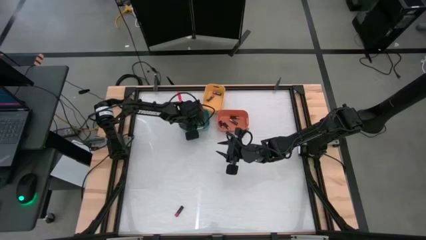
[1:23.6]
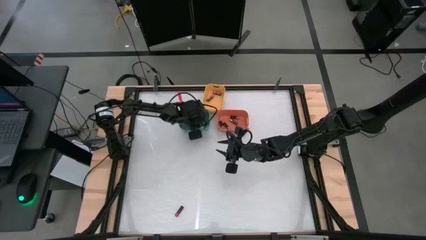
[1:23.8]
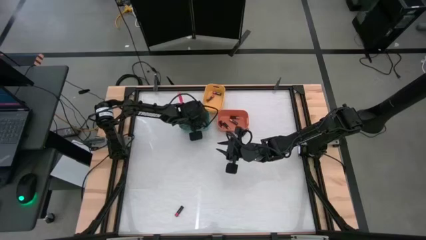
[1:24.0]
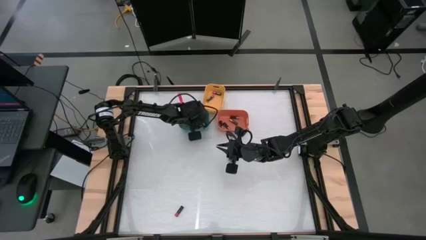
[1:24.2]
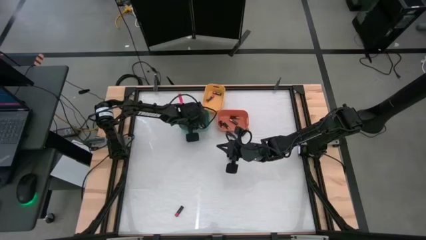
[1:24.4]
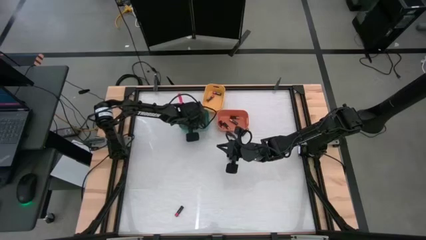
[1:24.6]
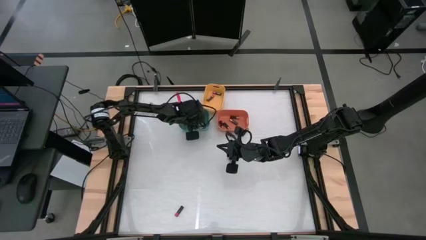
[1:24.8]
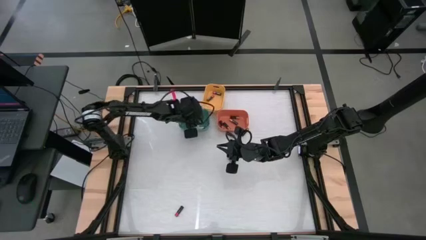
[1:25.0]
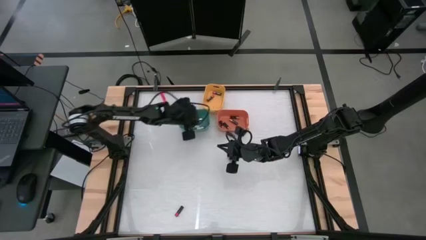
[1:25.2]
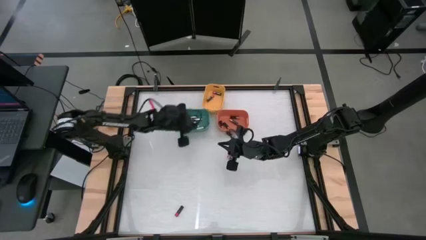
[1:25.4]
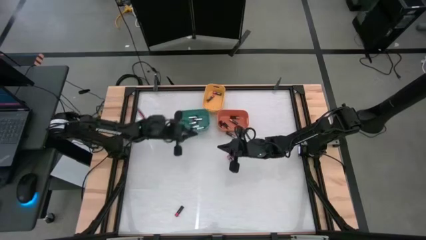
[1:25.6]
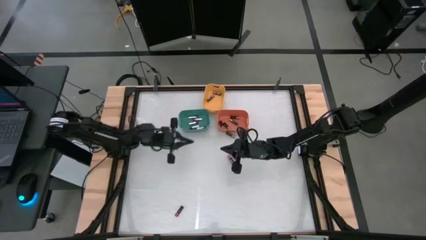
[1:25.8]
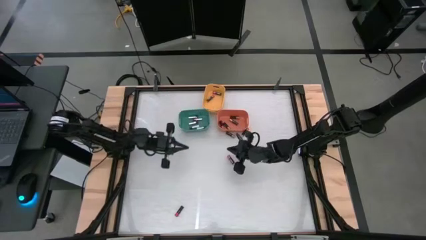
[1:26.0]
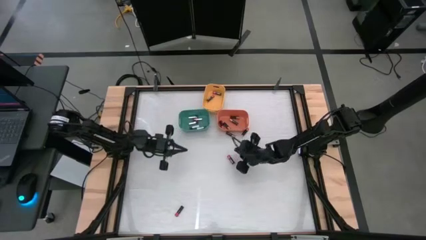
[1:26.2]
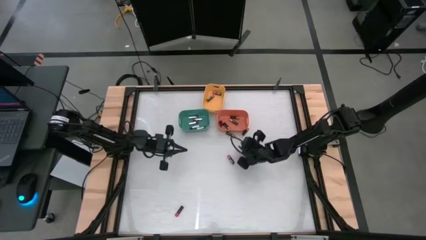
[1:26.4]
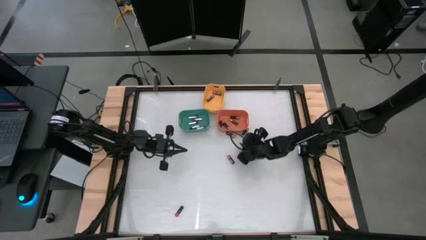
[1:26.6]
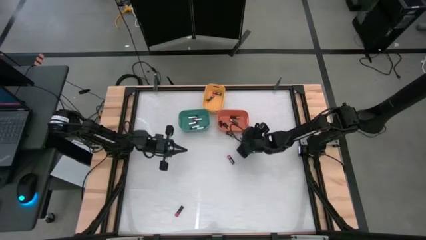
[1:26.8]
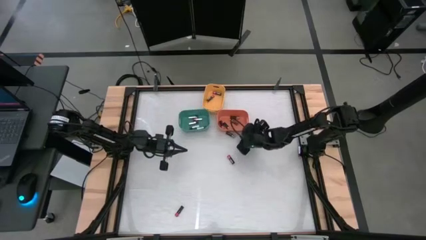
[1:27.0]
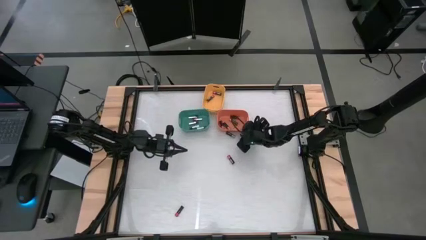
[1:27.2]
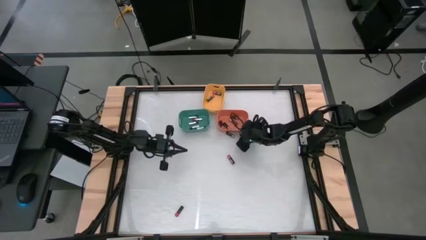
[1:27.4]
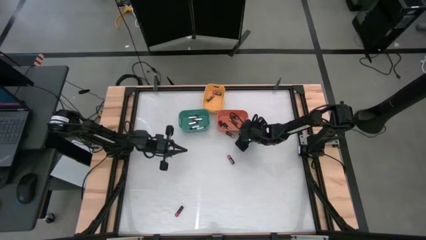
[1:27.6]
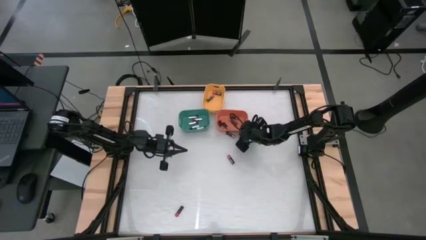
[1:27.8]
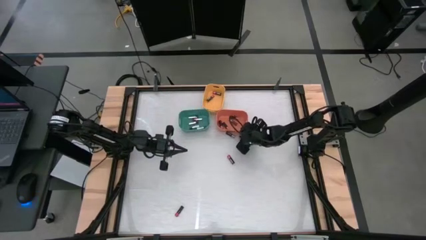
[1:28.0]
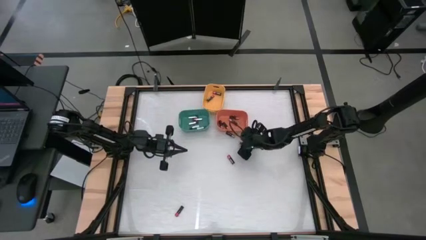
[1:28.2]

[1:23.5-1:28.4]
Task: Sort batteries
Put the brown battery into the orange bin

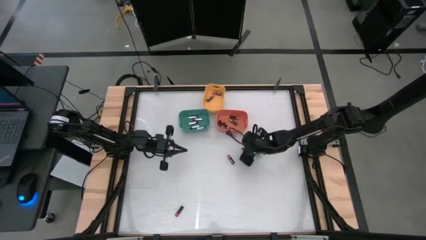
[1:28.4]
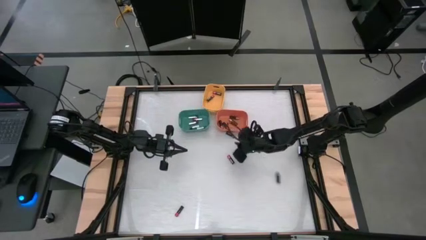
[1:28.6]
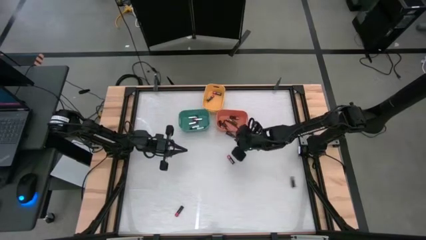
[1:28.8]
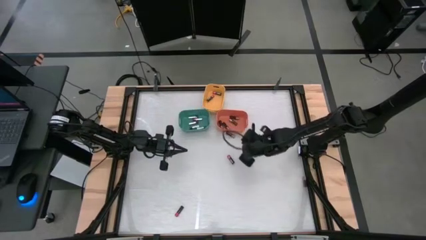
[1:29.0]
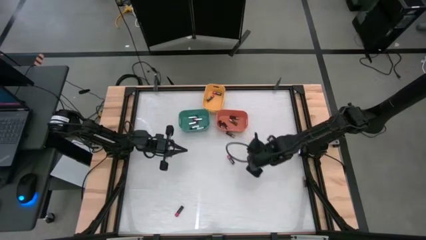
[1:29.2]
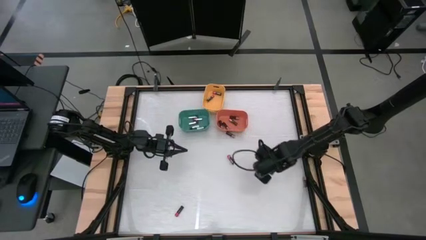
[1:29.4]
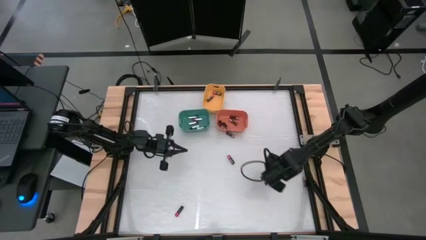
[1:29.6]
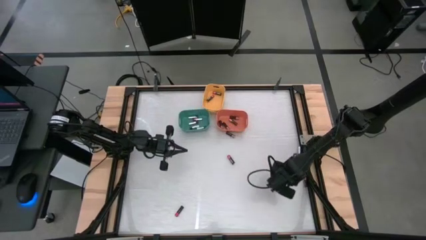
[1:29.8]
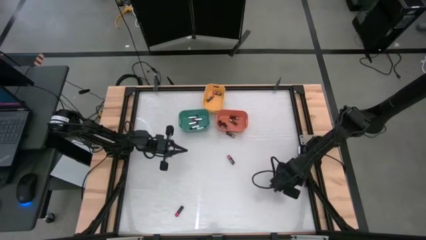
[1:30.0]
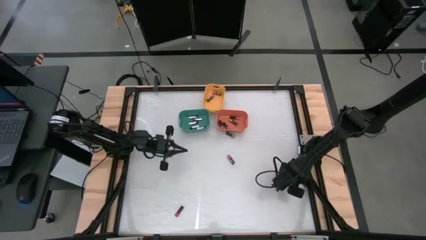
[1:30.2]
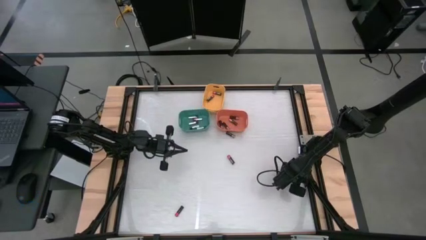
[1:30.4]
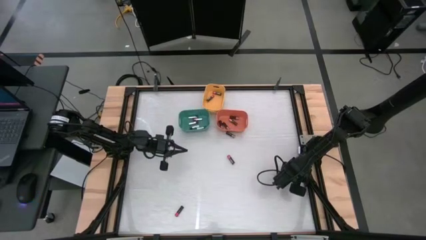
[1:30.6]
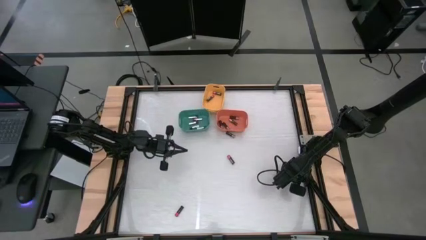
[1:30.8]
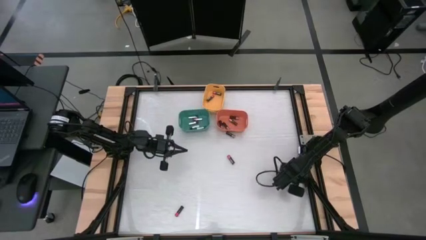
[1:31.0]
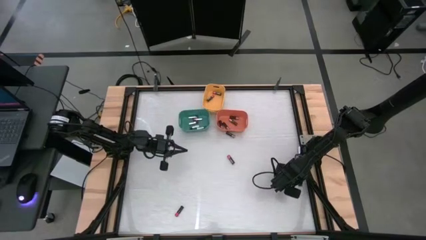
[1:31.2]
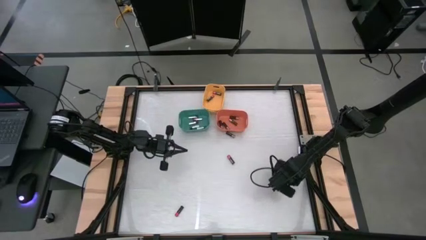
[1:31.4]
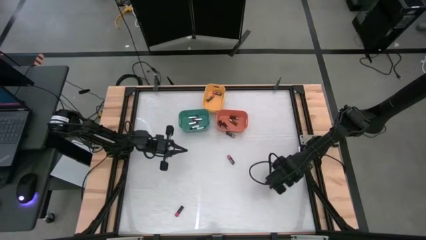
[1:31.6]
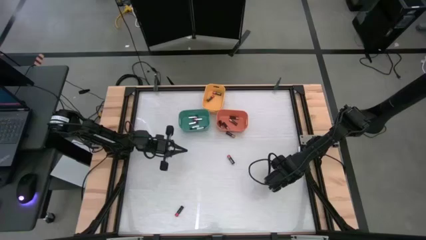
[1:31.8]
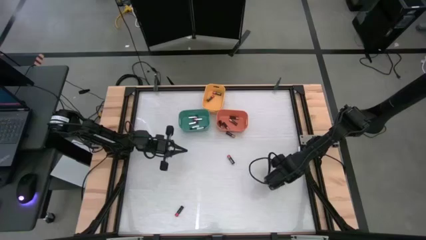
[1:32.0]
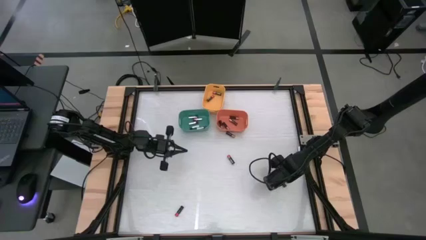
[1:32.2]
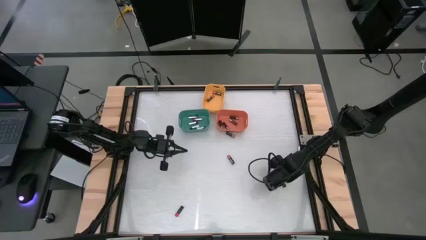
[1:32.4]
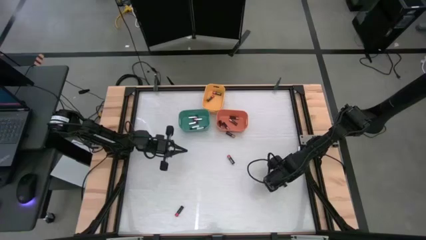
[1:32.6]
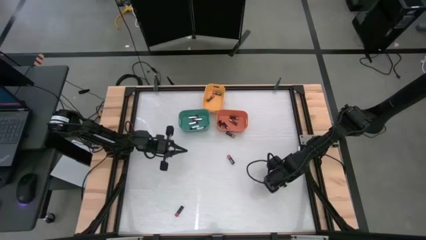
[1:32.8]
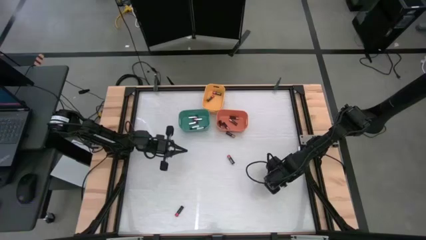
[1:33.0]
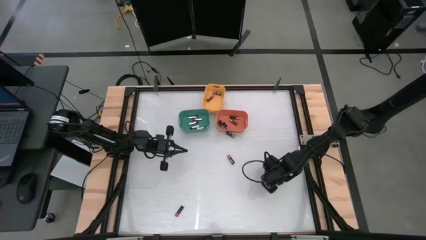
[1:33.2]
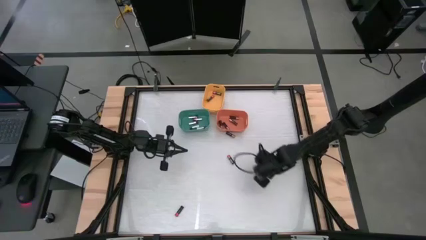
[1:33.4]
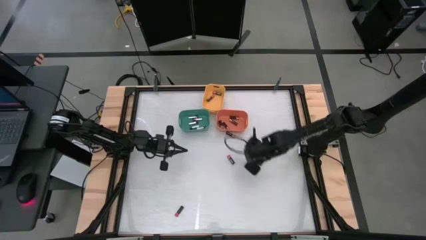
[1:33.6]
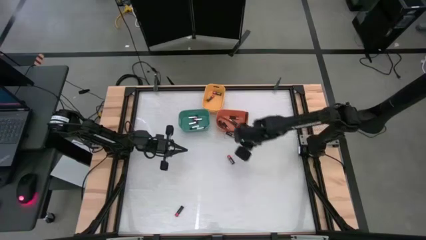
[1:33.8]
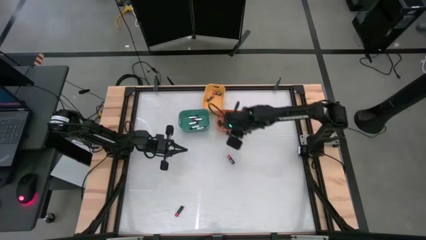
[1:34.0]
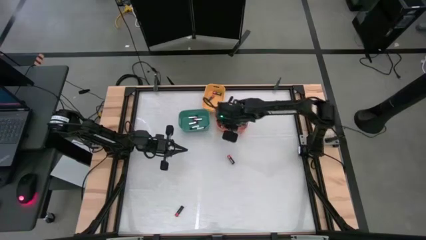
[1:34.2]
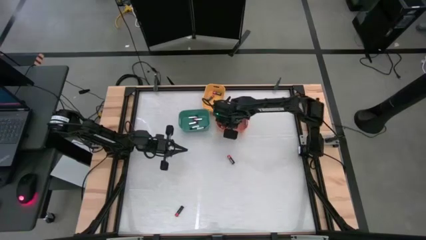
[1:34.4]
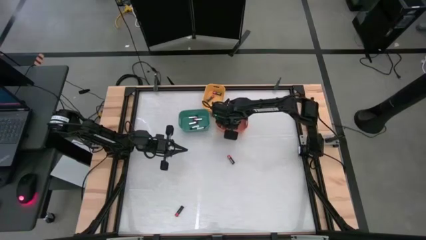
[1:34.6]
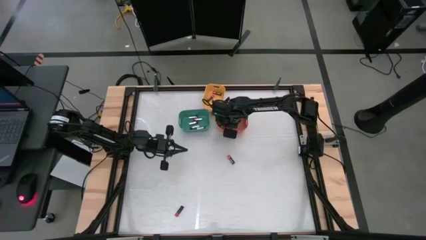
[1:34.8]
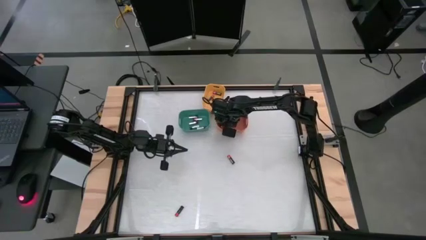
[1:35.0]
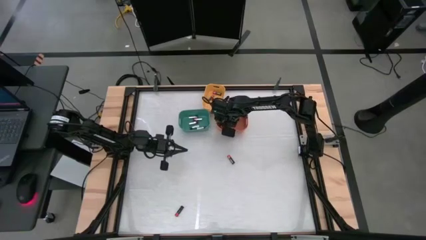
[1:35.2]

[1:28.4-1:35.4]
Put the brown battery into the orange bin

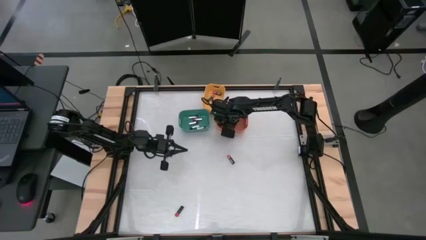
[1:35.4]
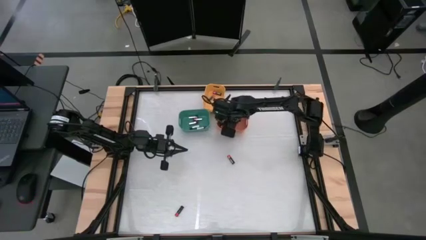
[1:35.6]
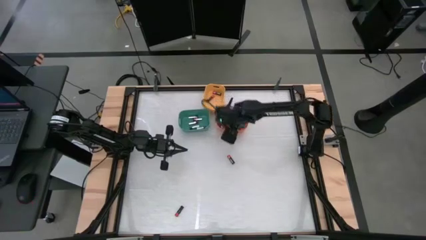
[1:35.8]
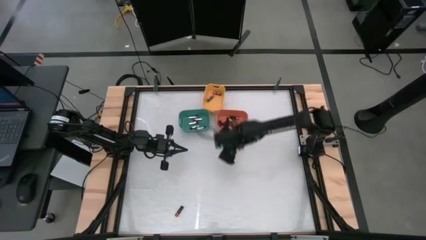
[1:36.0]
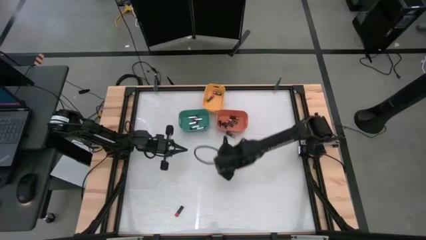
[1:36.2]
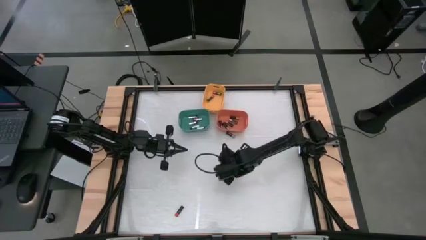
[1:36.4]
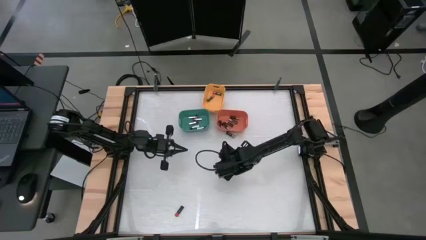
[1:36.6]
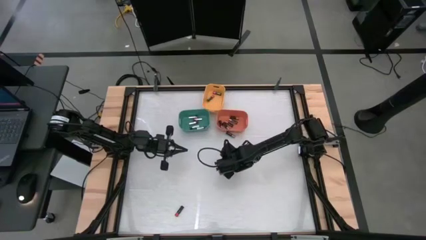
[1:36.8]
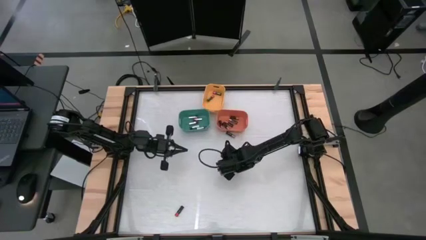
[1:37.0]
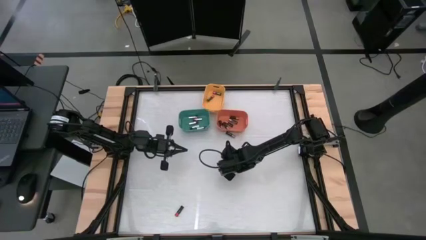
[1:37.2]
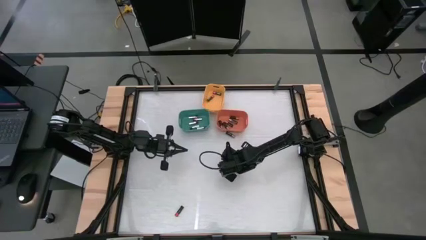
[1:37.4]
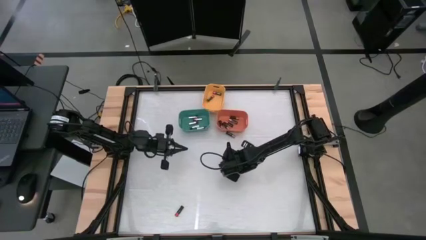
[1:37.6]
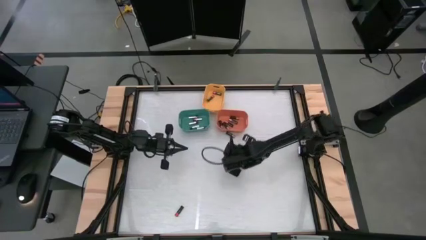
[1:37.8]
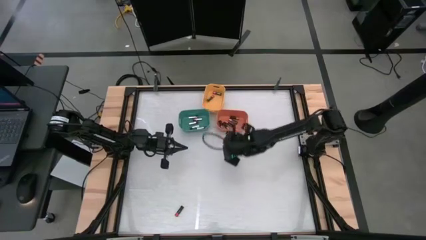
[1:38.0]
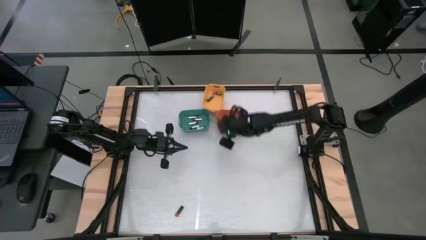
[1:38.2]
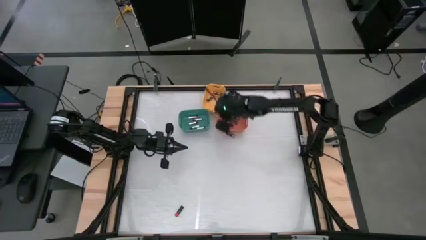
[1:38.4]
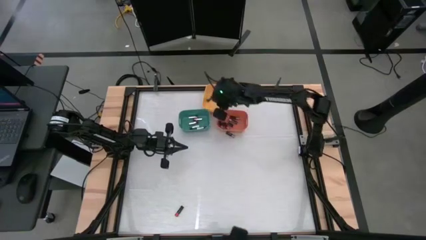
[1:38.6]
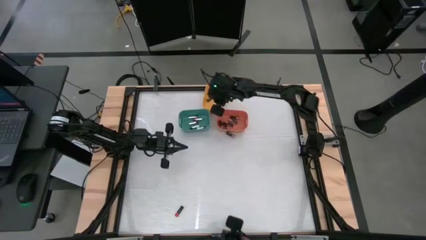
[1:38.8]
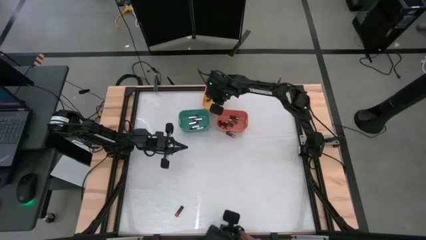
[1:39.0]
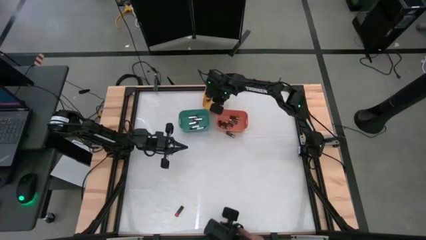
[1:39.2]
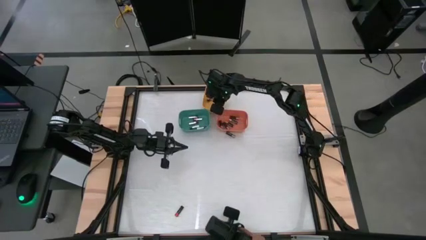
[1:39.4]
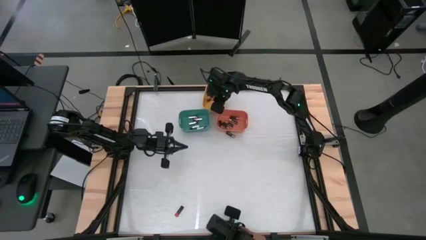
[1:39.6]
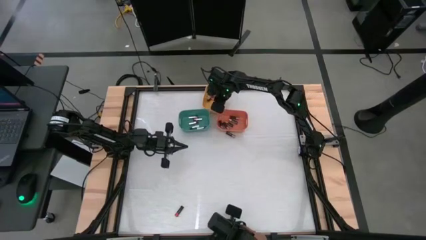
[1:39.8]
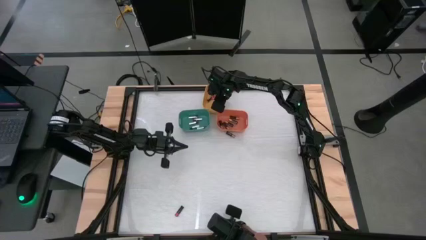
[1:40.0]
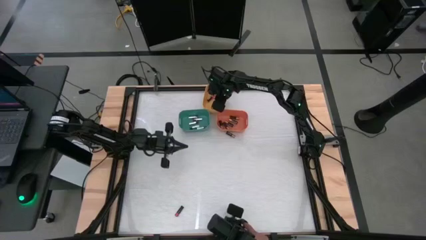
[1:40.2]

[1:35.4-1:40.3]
Put the red battery into the yellow bin
